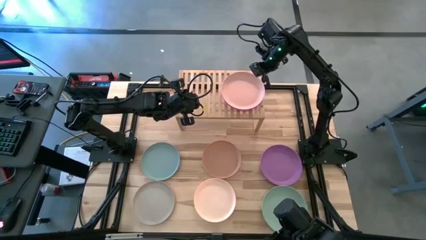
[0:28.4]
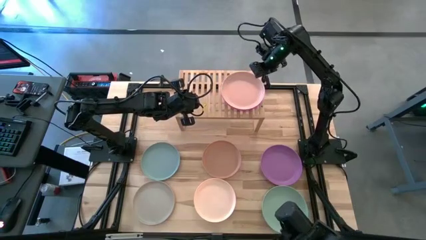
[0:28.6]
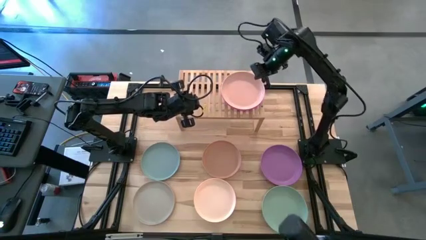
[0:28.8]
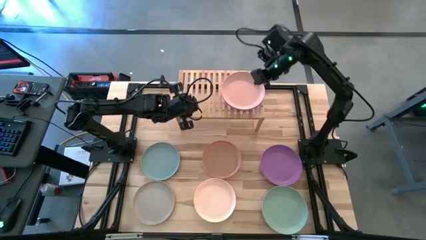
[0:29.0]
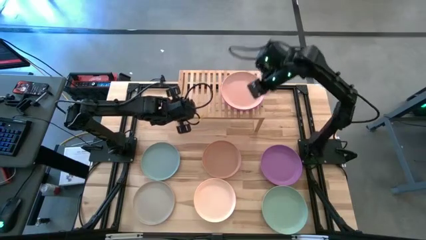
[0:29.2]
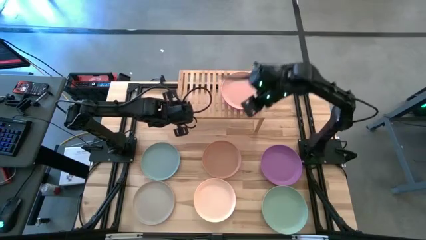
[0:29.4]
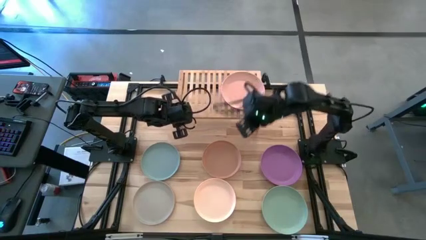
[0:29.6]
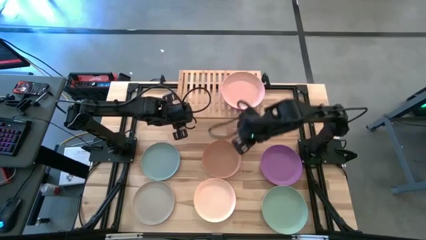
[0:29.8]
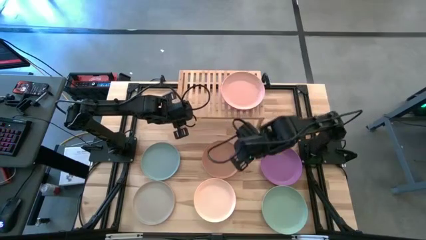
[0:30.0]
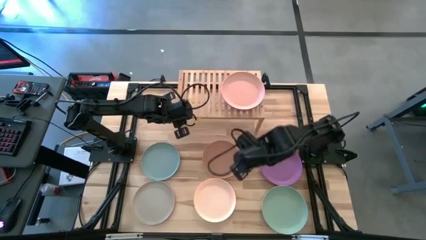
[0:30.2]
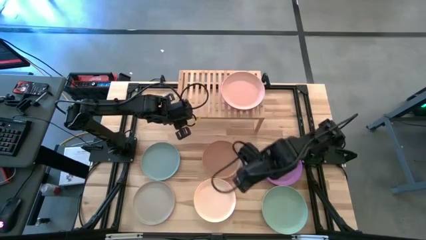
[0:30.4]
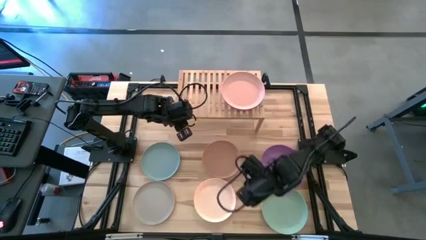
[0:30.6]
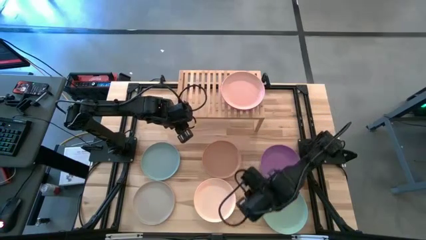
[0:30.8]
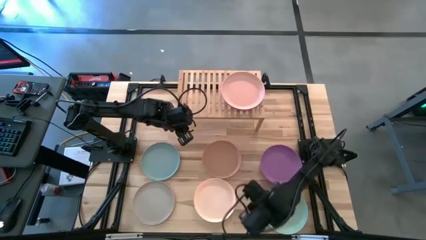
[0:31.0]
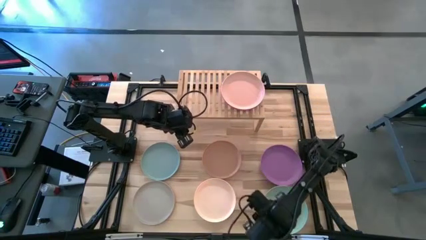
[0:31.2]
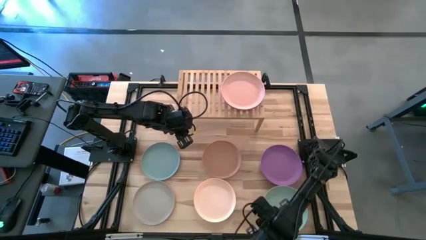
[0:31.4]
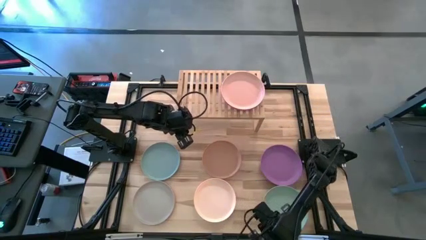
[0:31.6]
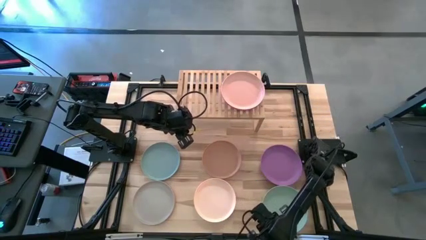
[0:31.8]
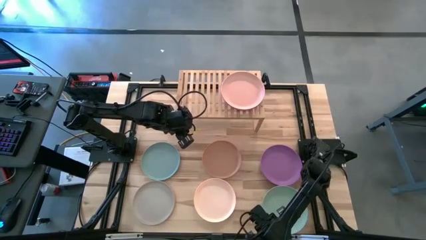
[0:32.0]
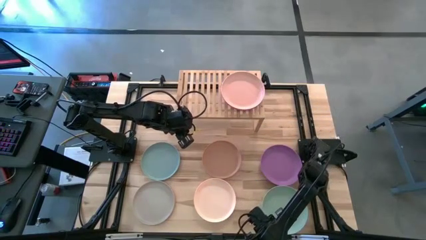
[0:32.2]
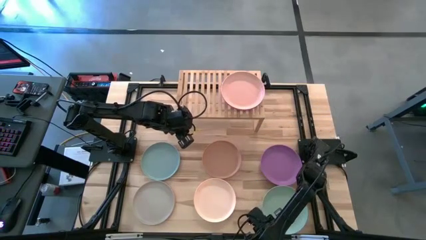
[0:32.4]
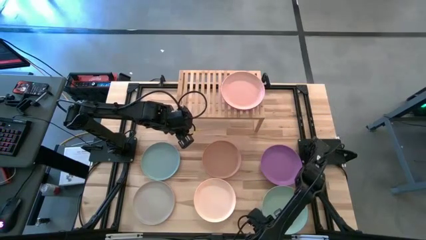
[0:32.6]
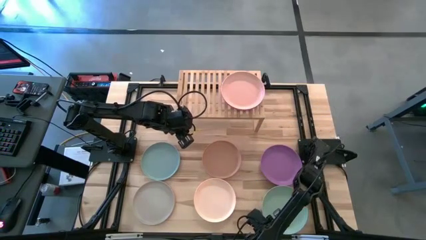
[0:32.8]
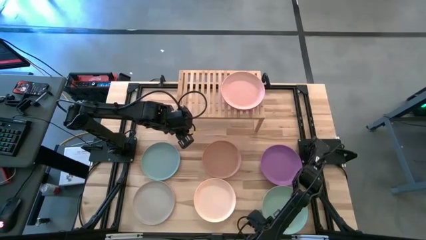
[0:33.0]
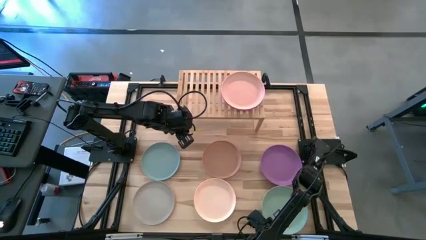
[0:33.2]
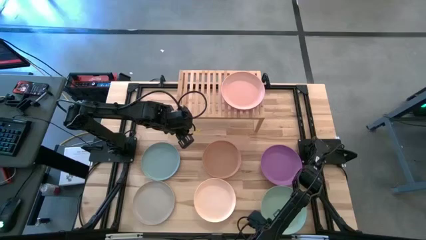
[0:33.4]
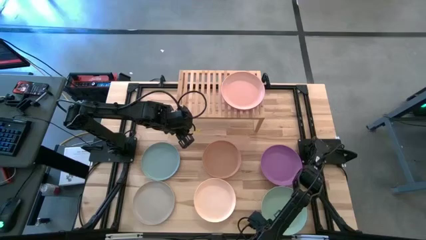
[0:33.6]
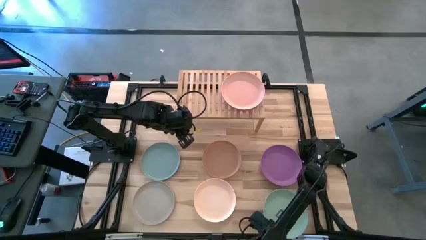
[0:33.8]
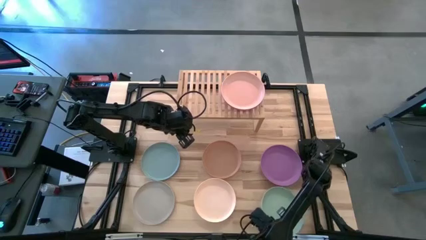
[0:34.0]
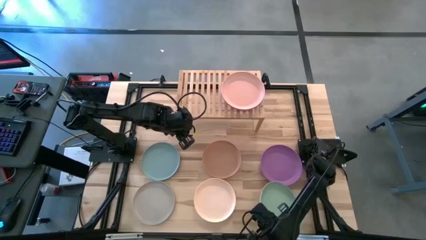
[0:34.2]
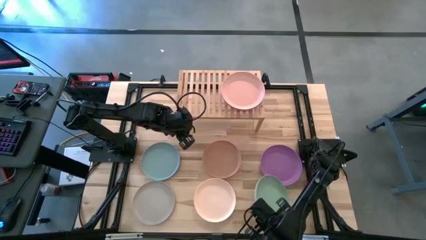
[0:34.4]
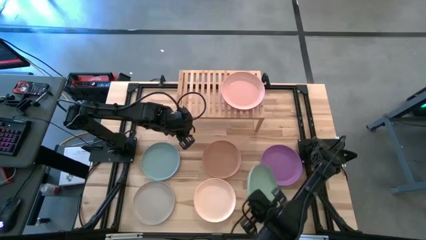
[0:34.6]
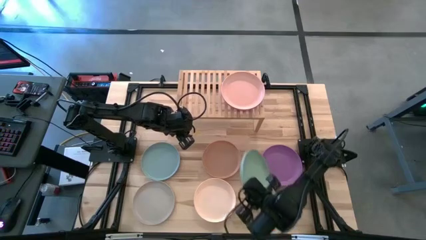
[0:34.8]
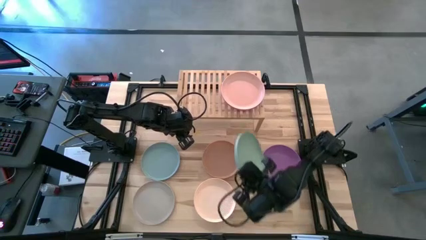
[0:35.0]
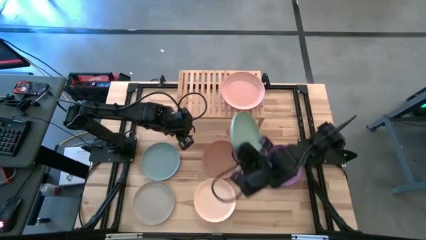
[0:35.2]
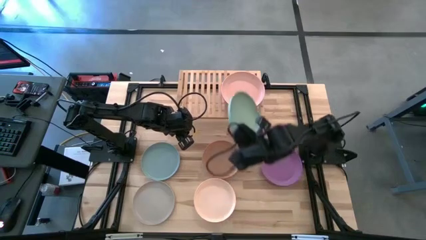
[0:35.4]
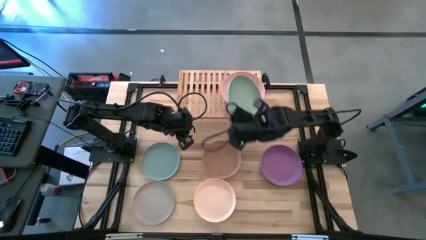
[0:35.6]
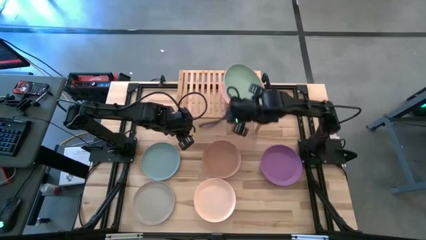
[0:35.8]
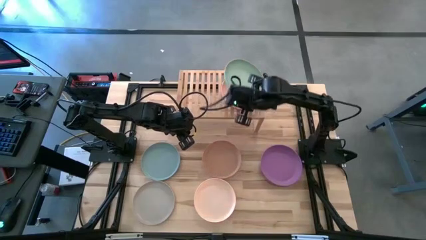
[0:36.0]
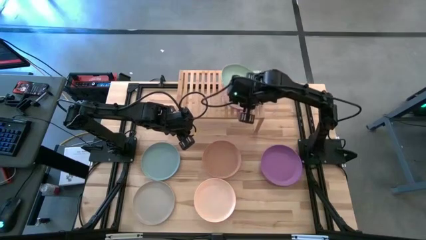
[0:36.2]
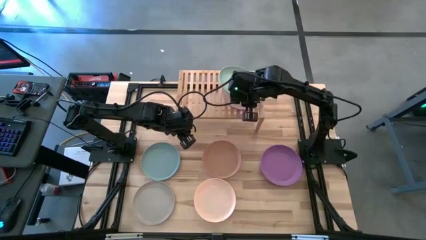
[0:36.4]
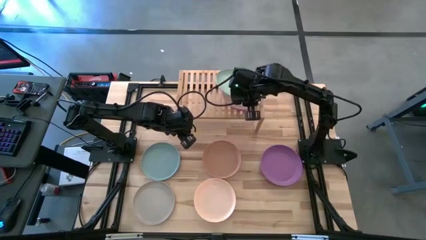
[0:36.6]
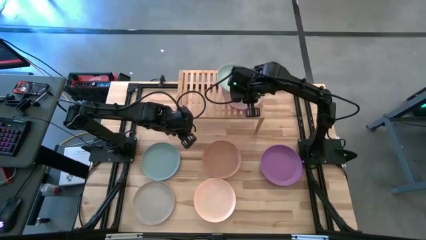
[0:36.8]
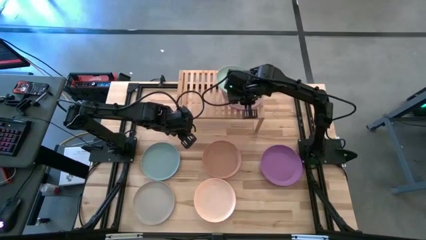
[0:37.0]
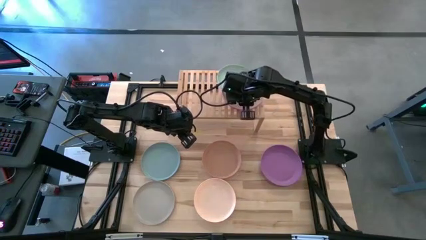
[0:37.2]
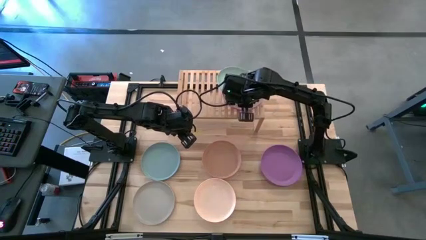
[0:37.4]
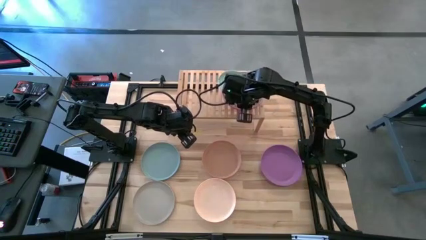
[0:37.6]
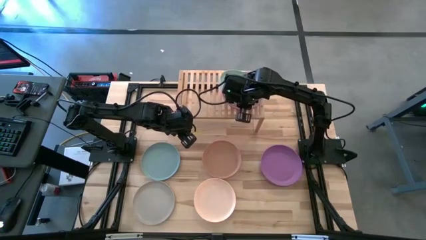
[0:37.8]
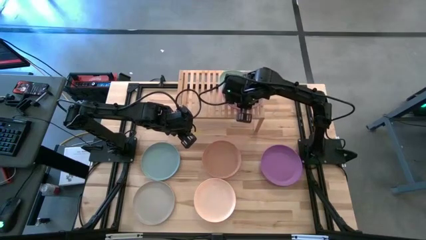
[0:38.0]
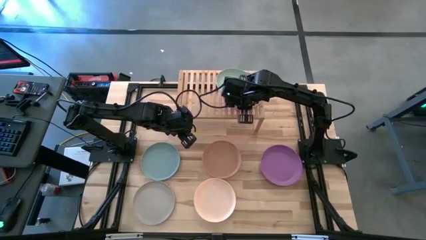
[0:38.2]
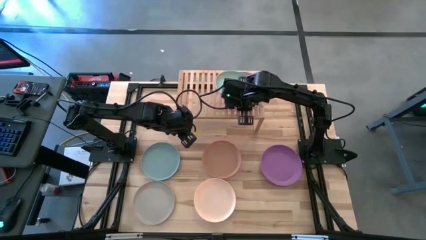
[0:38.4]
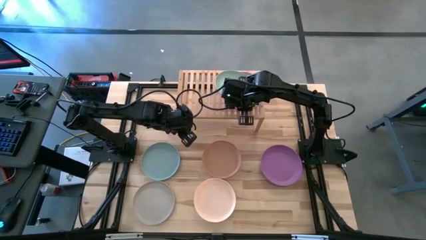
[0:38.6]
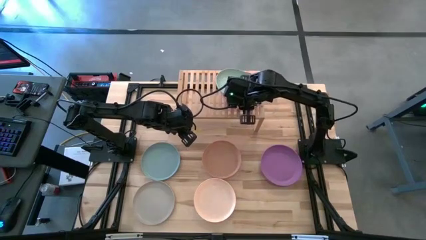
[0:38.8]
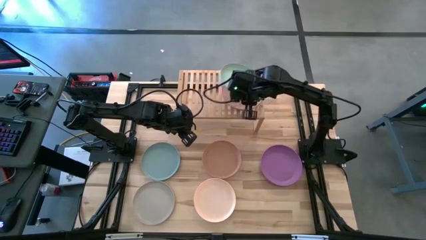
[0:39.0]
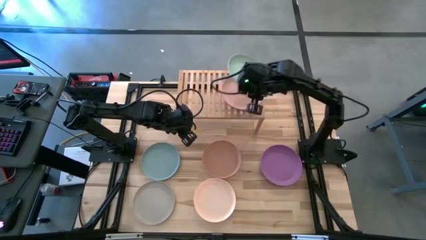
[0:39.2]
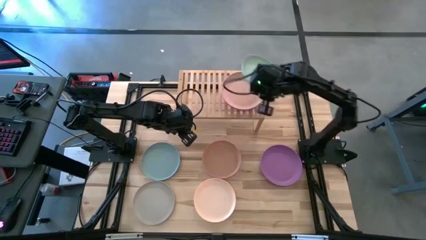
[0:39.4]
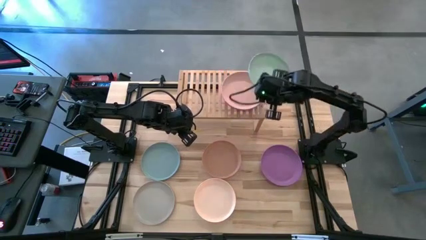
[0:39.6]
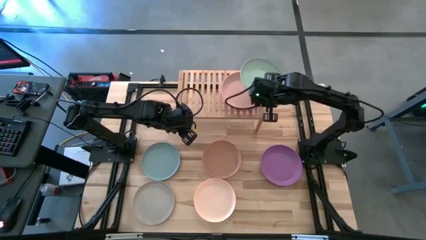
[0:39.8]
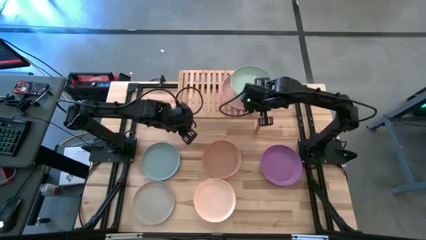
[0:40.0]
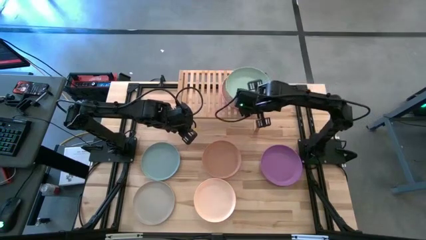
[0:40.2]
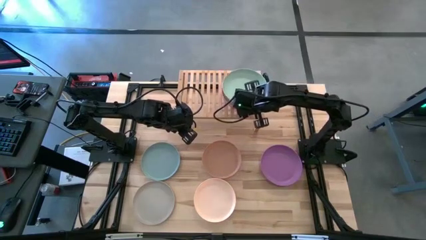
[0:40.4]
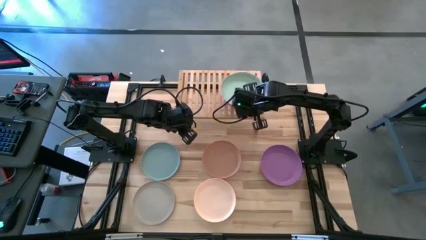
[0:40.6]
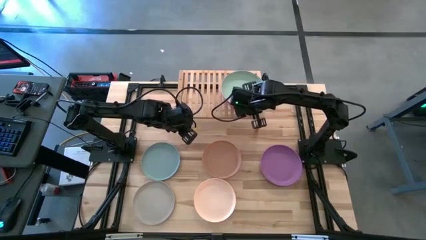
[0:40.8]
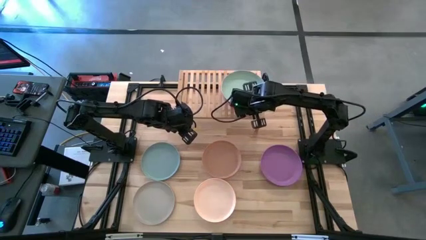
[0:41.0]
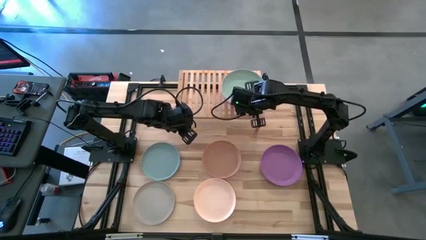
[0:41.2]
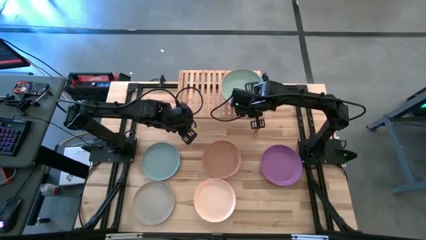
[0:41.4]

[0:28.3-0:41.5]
Task: Place and stack plates onto a shelf
Stack the green plate on top of the orange on the shelf
